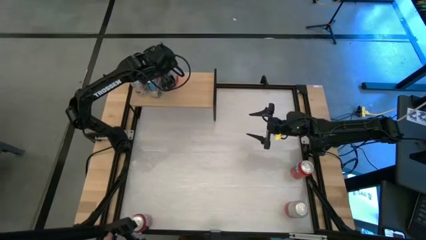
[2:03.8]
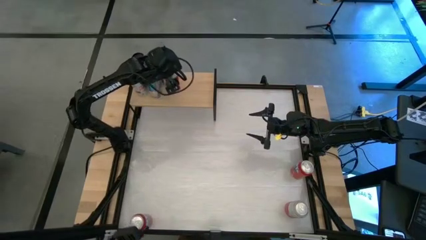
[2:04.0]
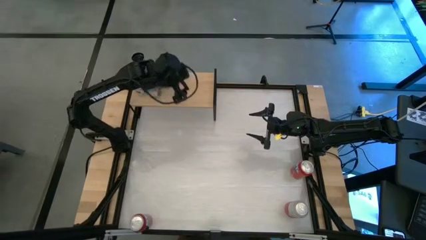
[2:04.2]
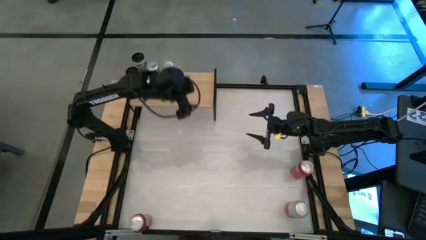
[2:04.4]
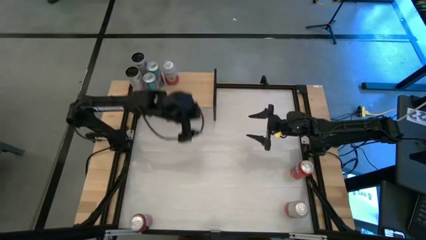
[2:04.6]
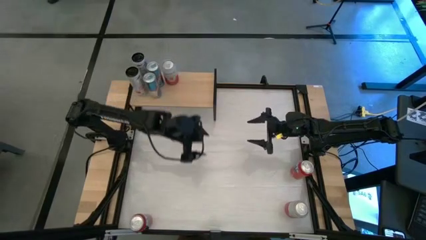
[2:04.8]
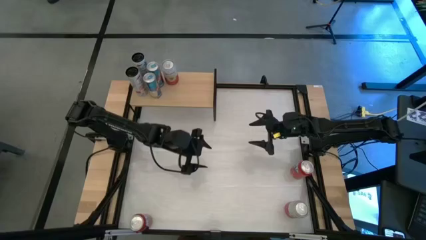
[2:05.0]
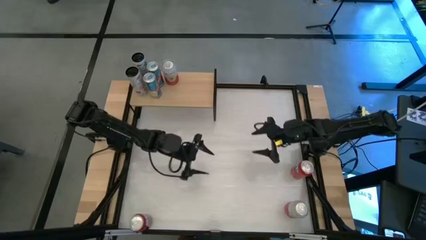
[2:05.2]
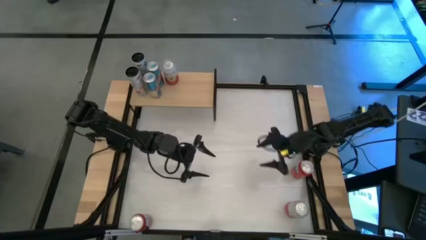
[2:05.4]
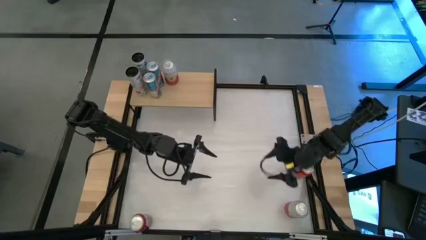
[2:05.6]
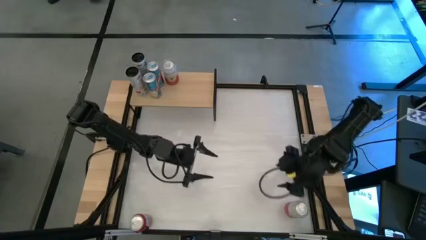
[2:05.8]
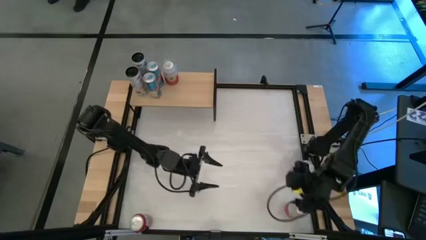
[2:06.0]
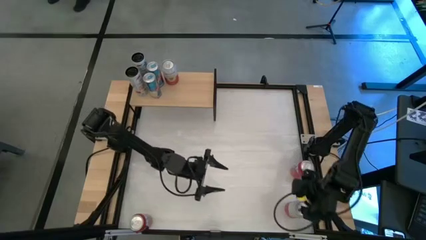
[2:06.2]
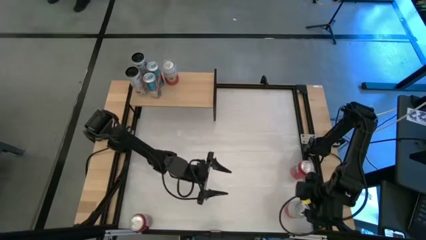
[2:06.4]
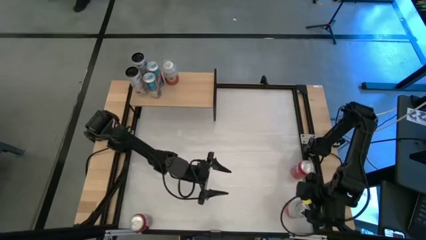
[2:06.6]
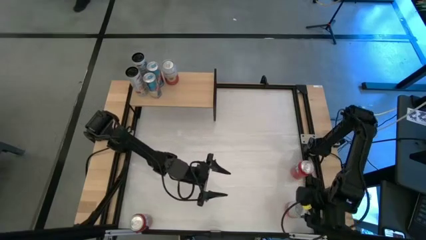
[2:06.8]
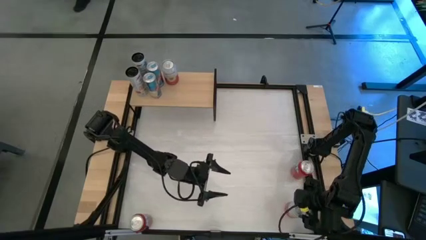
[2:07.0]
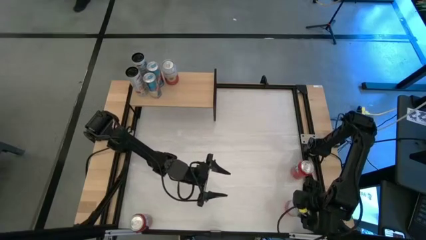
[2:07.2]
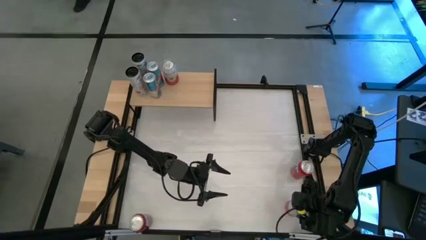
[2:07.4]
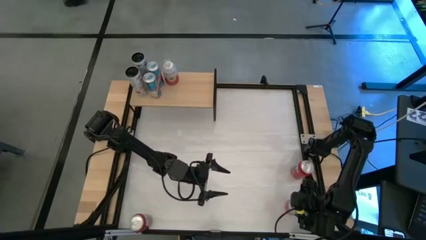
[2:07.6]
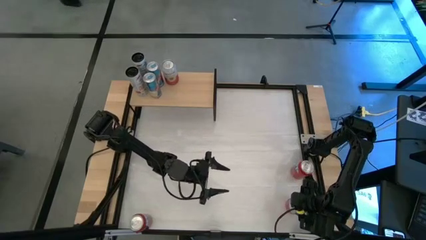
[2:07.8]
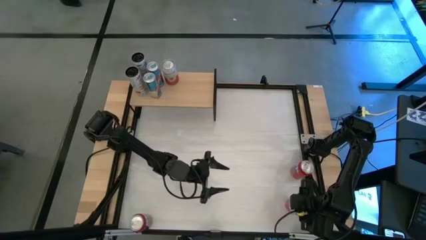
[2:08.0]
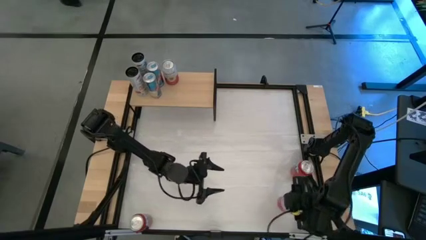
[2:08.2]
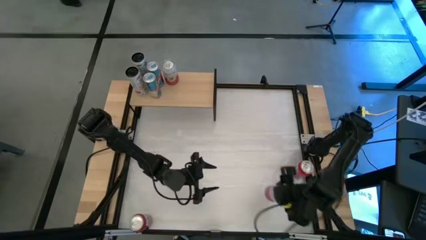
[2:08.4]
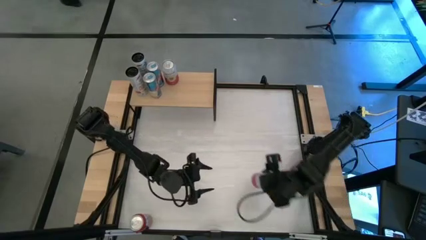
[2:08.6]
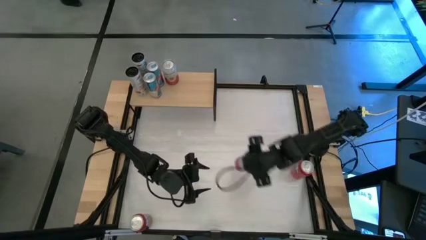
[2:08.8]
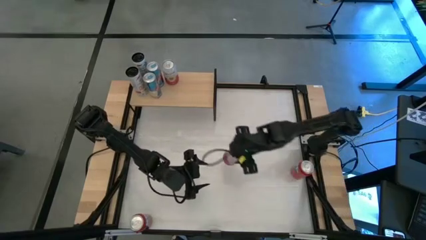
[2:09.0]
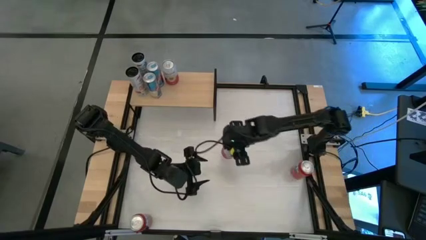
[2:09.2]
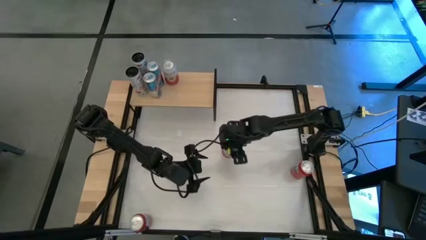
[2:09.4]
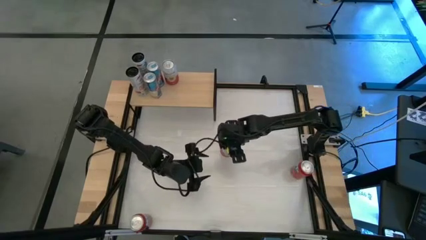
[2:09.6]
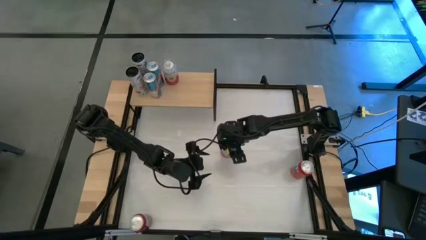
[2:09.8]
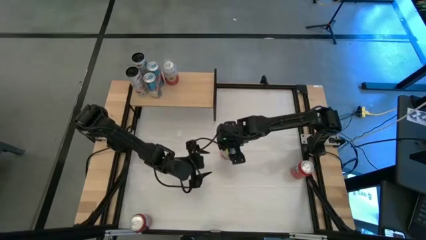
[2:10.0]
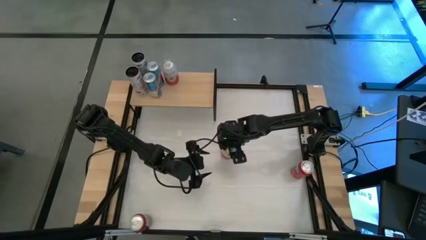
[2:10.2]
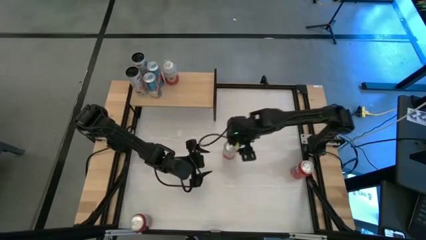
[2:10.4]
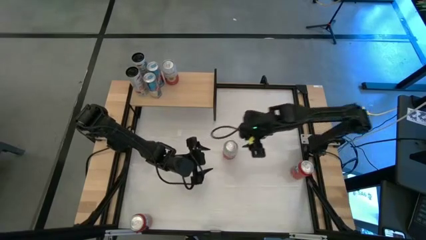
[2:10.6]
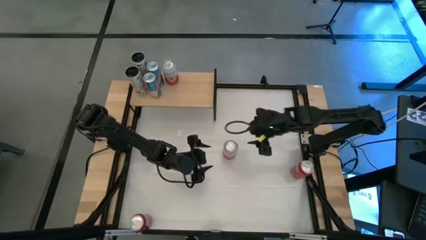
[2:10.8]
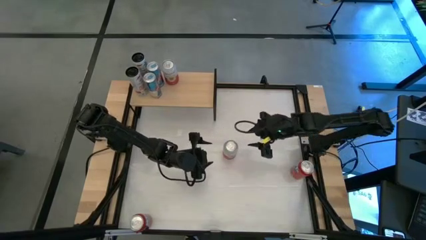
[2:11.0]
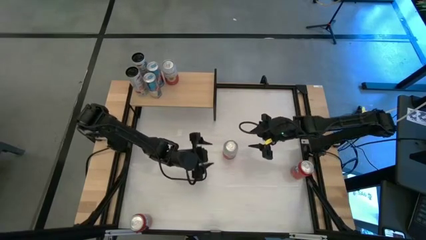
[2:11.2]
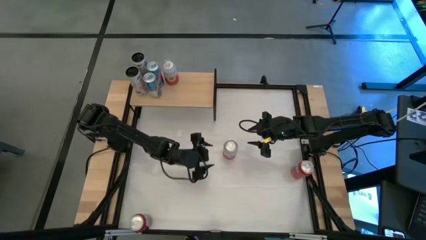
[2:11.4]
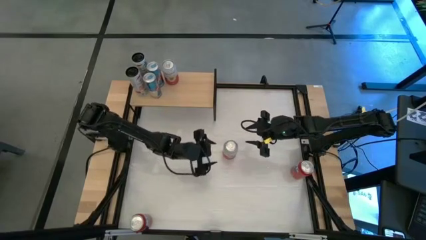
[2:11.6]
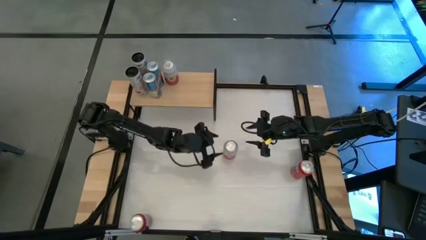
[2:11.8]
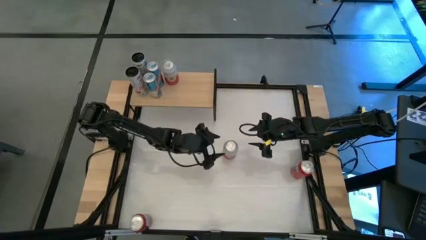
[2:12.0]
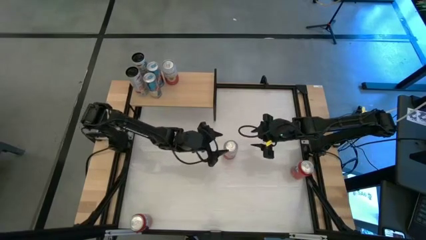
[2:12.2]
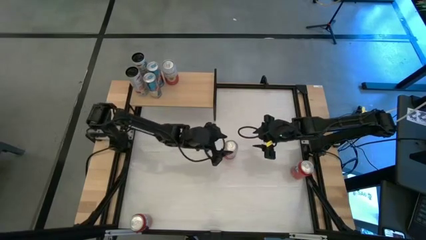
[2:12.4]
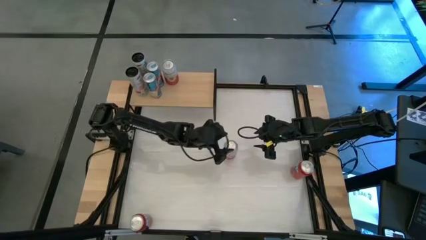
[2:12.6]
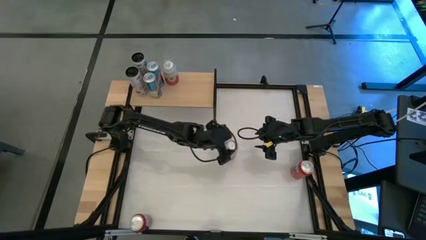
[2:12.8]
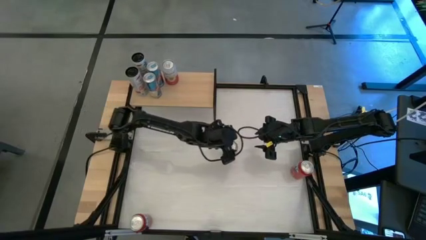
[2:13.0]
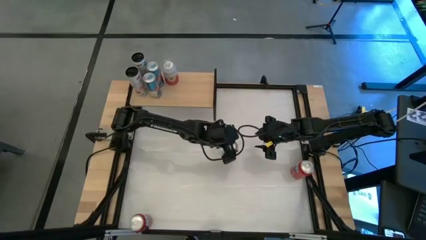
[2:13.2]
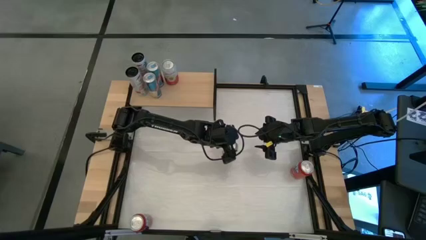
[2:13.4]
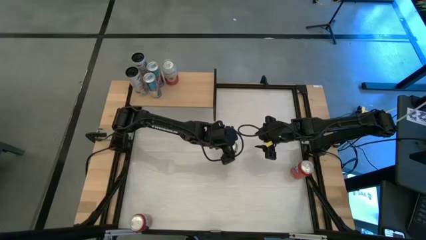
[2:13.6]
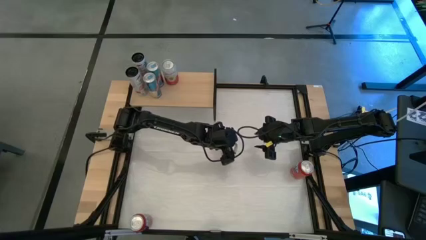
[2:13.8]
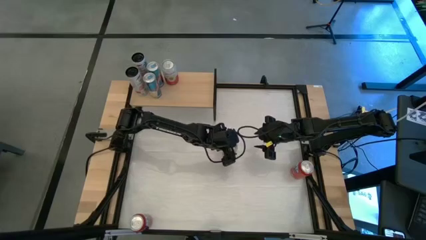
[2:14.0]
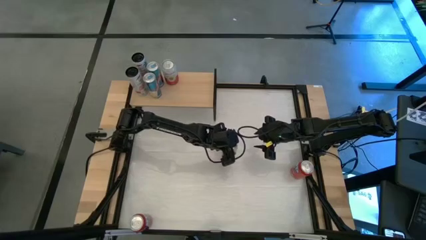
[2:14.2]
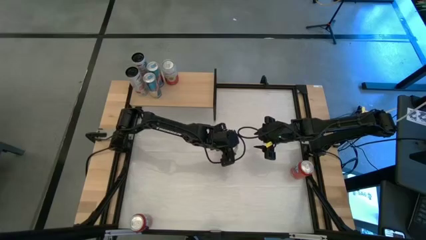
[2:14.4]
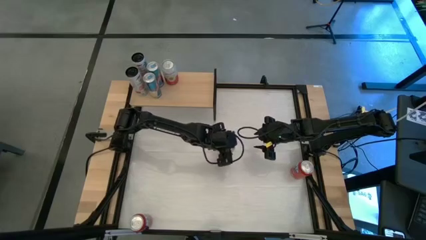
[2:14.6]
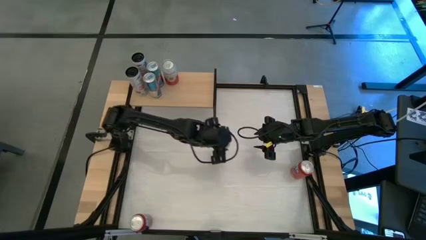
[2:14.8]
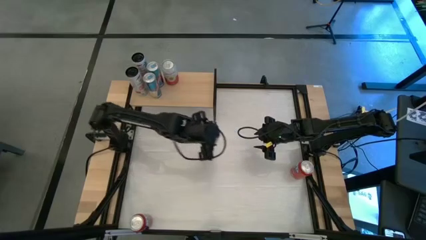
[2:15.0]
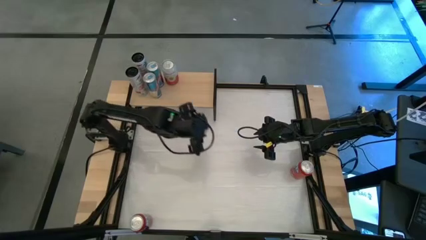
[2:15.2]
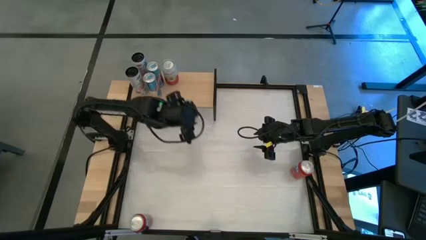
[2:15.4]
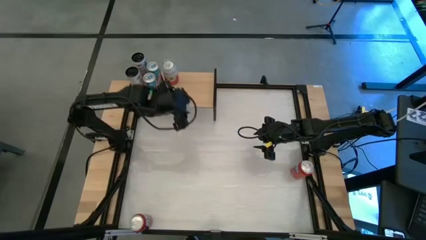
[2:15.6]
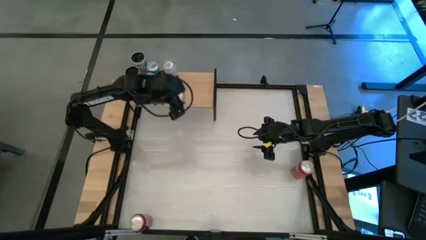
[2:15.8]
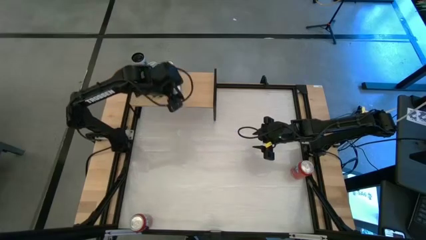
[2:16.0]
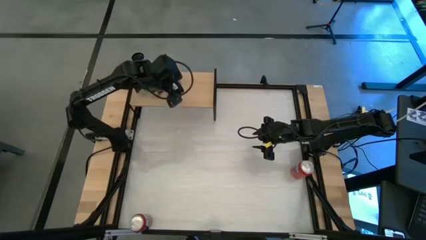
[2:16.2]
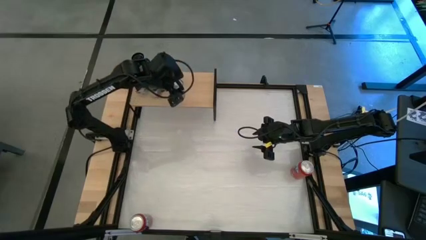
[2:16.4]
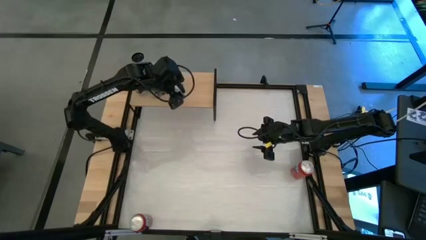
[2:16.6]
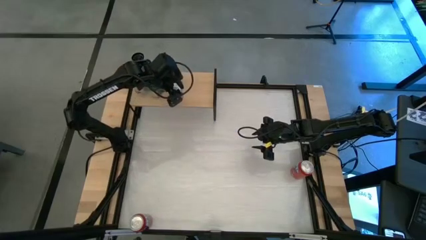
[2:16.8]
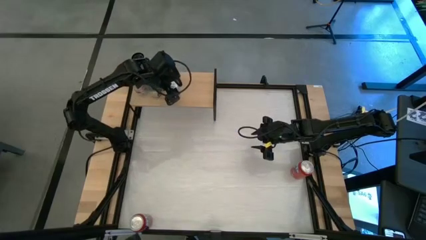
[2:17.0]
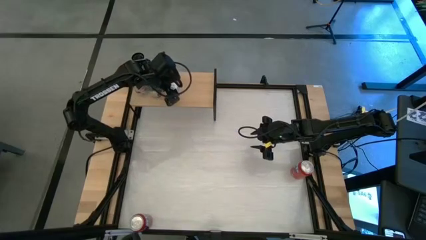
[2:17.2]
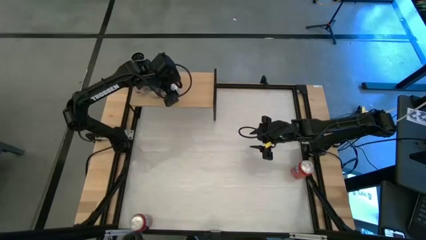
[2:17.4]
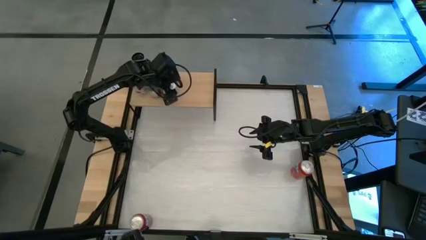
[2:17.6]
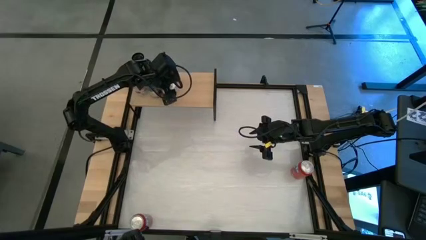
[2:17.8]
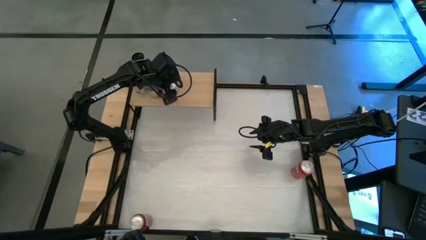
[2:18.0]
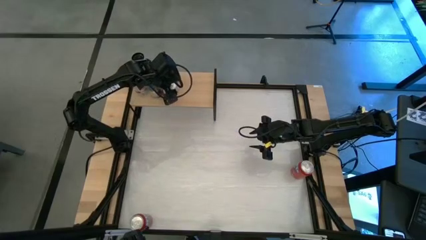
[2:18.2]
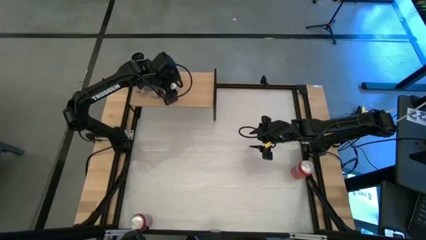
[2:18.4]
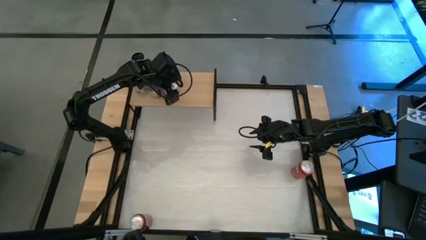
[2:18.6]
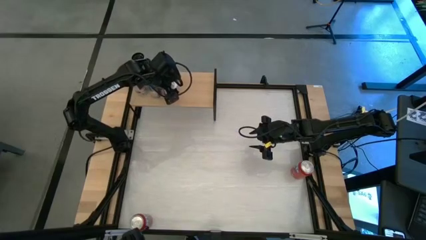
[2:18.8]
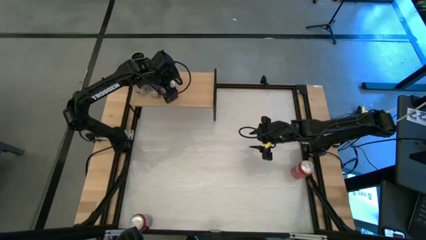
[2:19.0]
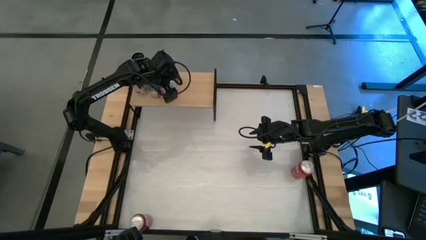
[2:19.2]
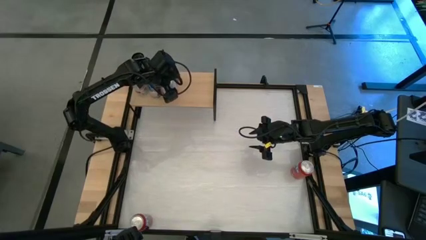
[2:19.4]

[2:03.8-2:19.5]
Task: Place canned beverage on shelf
Put the pink white soda can on the shelf aligned with the pink white soda

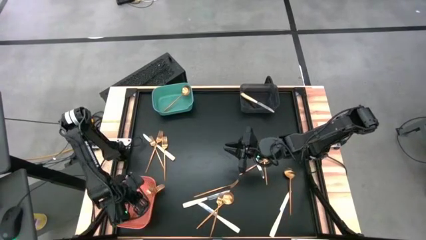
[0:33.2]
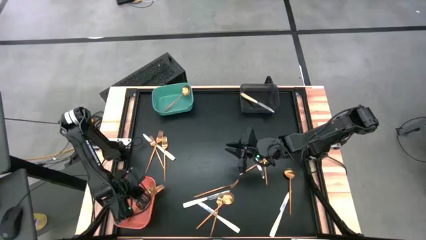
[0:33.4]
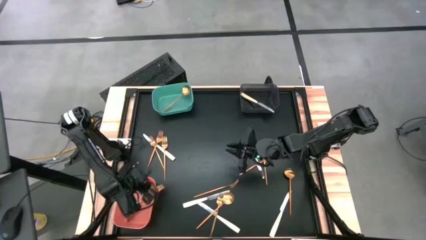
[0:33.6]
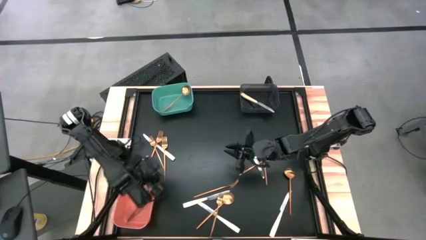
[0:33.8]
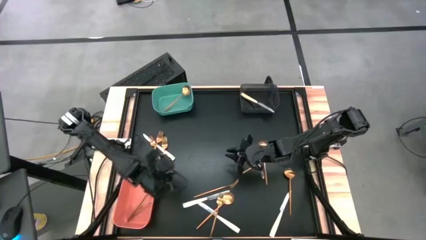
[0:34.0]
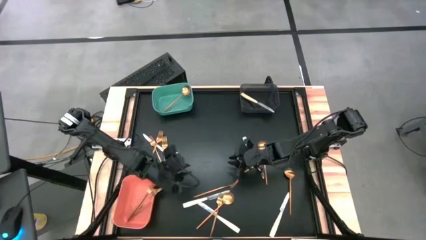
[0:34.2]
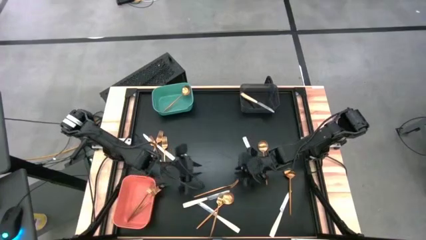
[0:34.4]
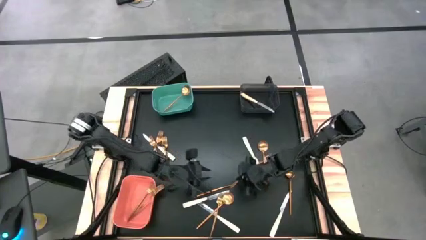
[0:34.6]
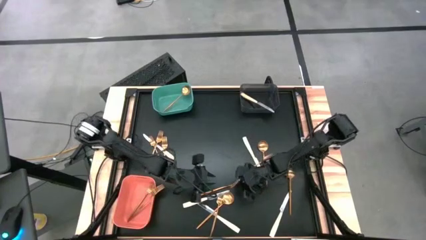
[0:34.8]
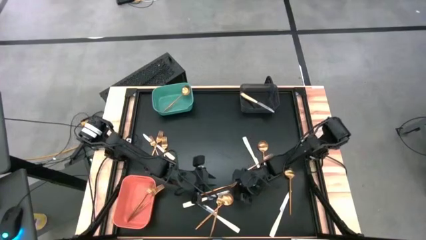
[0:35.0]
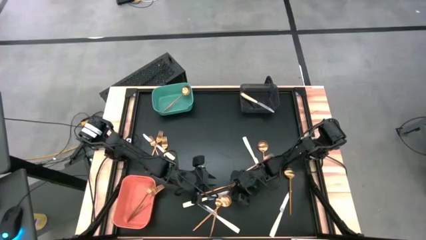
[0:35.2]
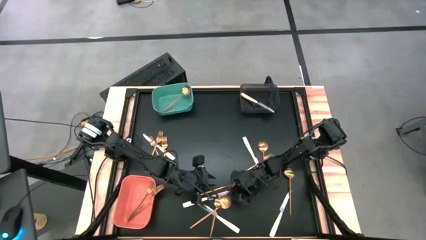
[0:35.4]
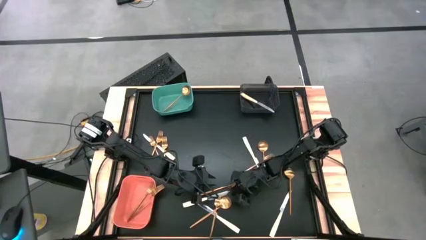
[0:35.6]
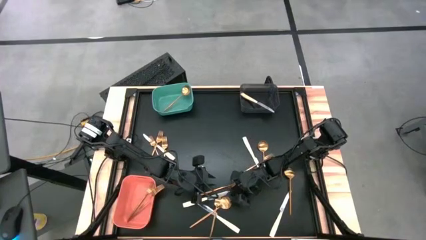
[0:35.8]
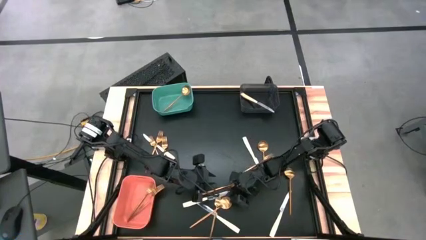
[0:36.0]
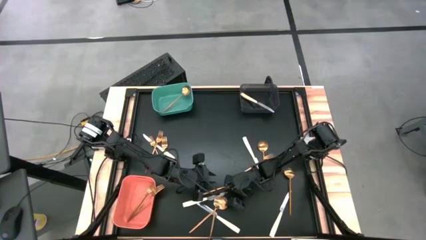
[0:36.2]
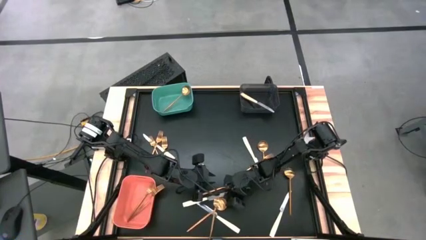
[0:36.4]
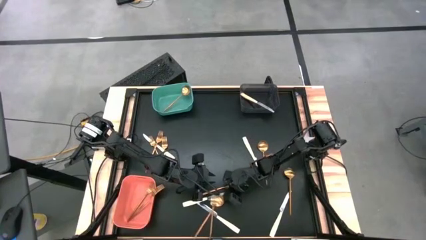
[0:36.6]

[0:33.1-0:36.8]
Task: Sort silverware by color (type)
Put the gold spoon into the green bin
